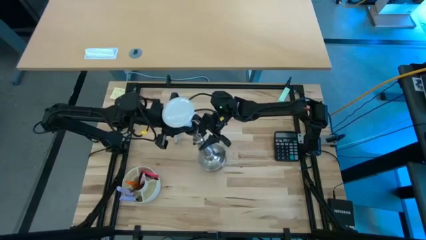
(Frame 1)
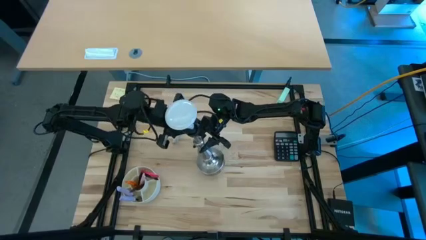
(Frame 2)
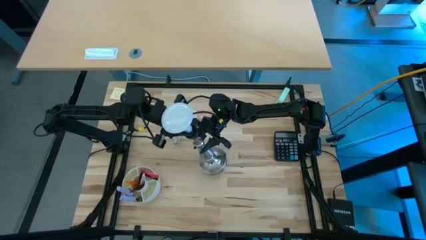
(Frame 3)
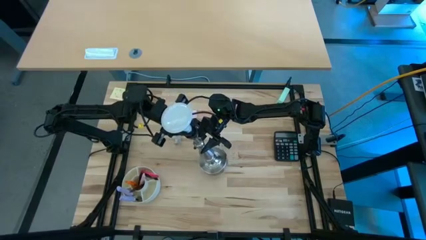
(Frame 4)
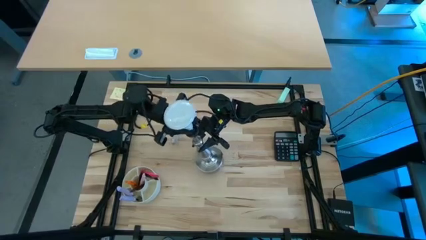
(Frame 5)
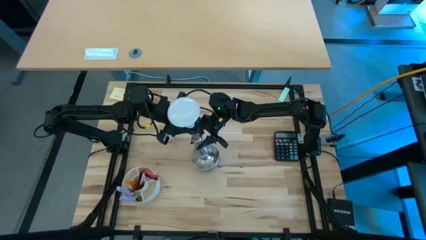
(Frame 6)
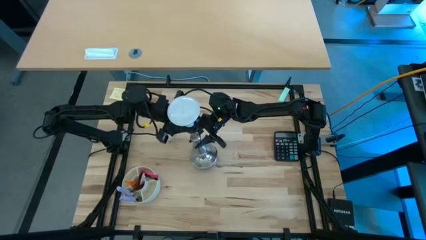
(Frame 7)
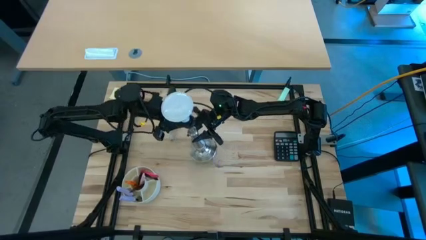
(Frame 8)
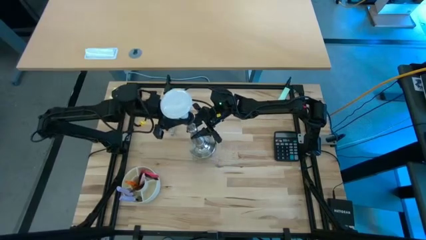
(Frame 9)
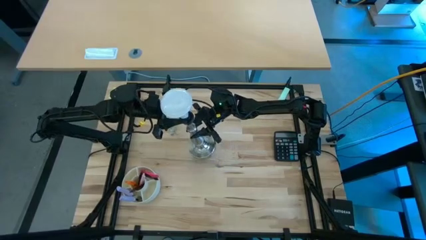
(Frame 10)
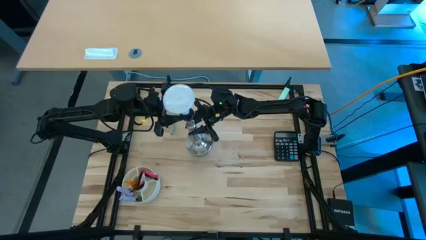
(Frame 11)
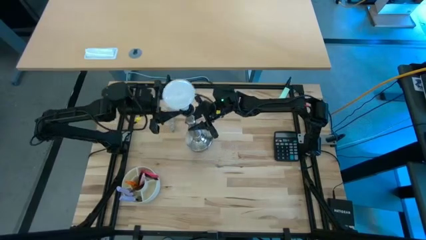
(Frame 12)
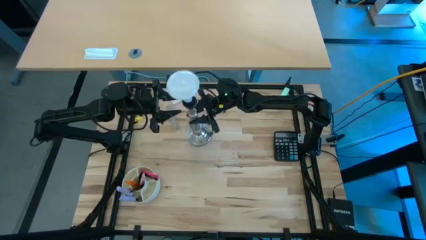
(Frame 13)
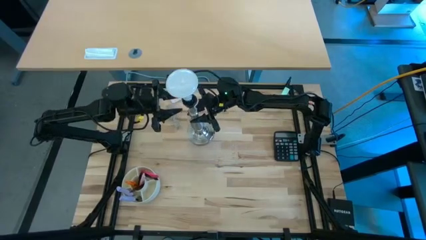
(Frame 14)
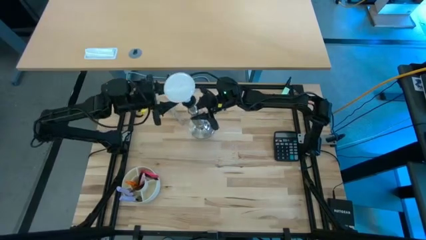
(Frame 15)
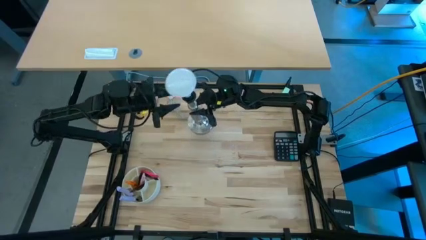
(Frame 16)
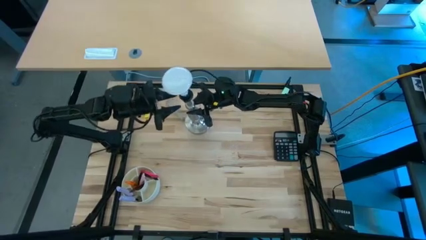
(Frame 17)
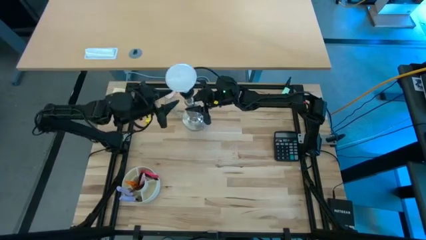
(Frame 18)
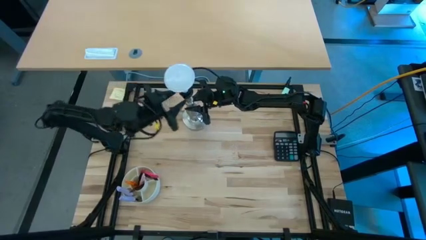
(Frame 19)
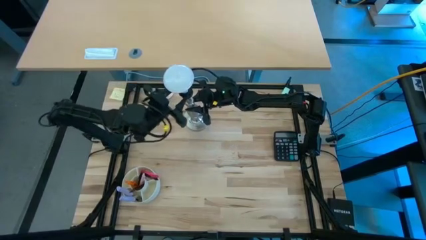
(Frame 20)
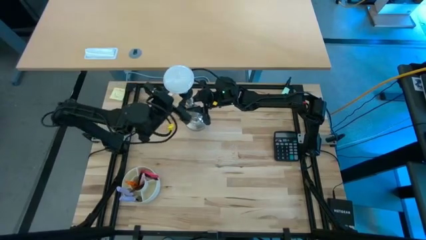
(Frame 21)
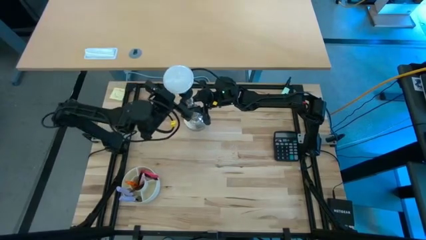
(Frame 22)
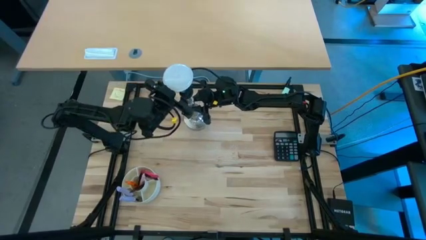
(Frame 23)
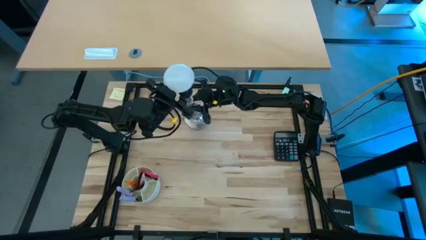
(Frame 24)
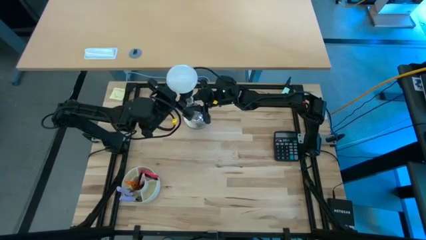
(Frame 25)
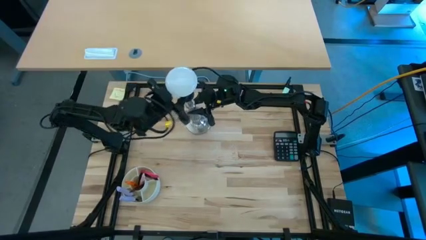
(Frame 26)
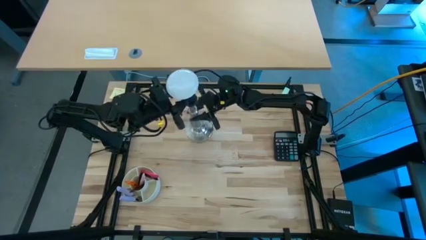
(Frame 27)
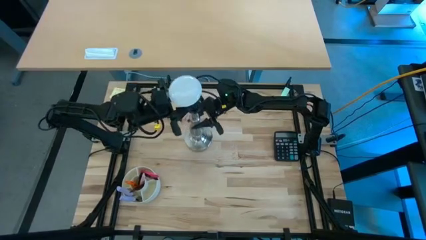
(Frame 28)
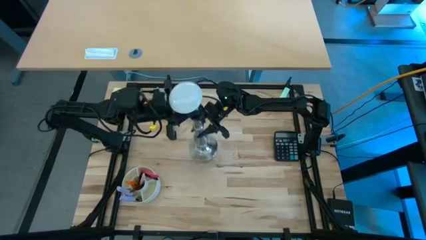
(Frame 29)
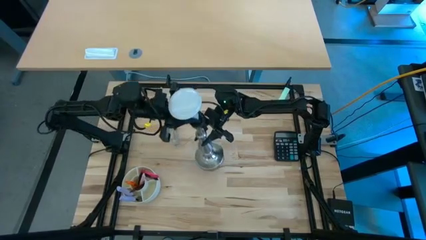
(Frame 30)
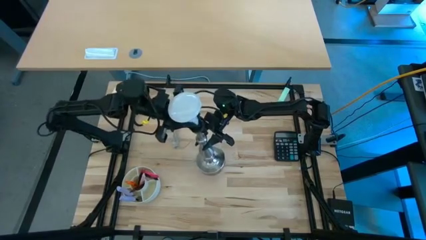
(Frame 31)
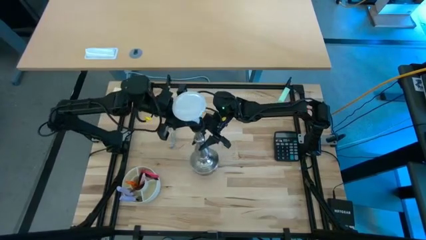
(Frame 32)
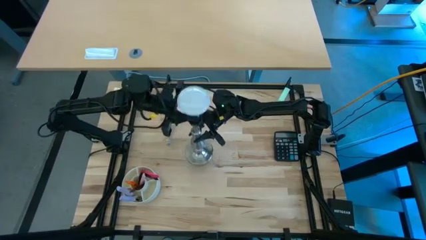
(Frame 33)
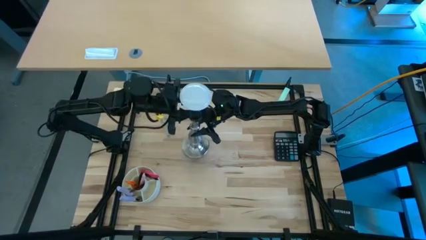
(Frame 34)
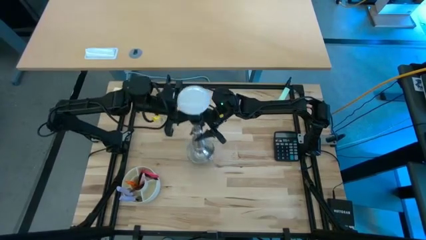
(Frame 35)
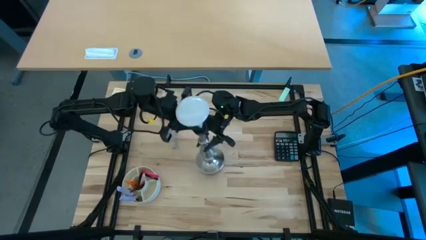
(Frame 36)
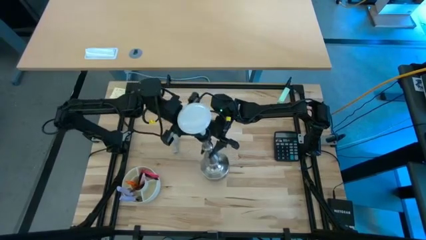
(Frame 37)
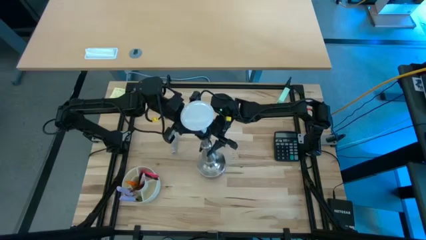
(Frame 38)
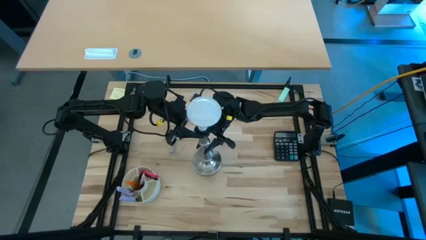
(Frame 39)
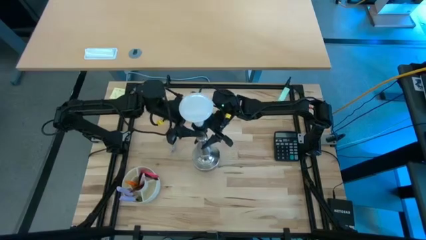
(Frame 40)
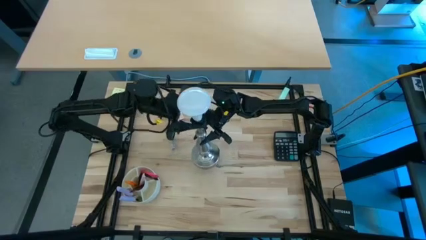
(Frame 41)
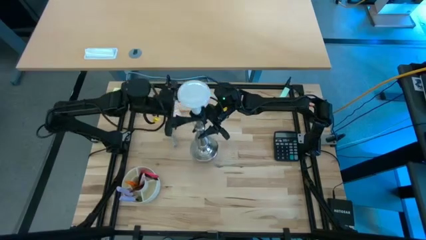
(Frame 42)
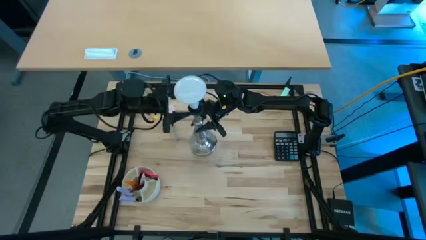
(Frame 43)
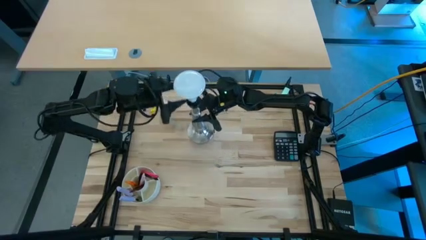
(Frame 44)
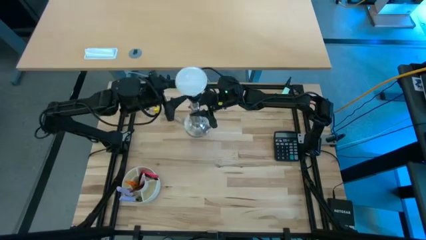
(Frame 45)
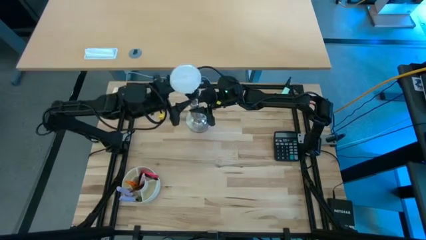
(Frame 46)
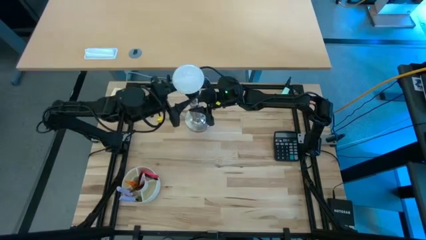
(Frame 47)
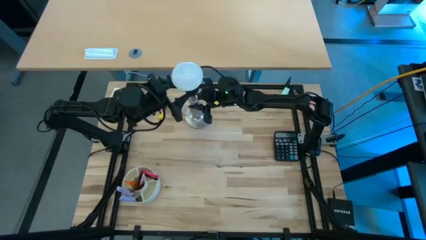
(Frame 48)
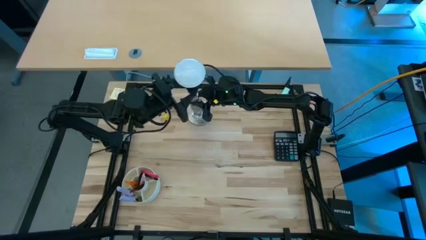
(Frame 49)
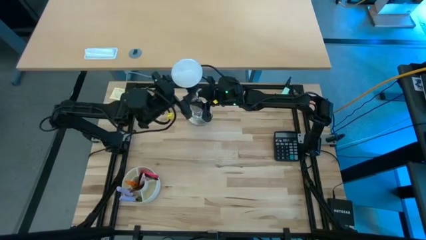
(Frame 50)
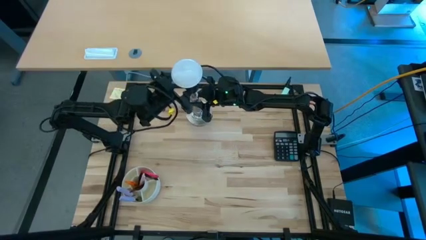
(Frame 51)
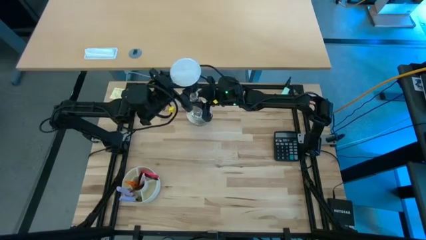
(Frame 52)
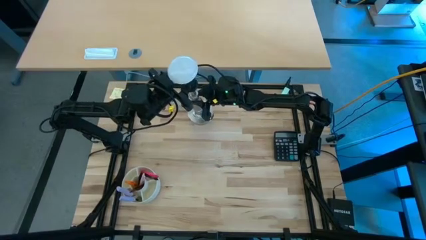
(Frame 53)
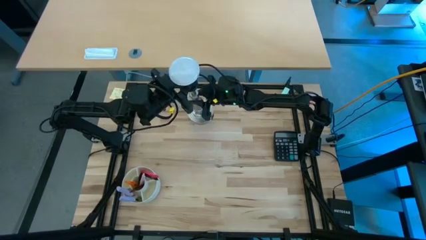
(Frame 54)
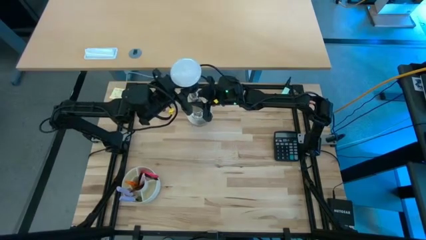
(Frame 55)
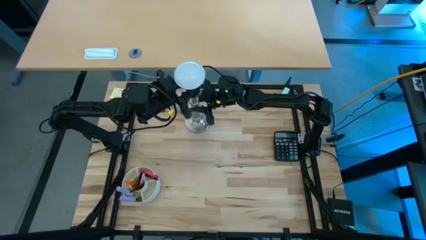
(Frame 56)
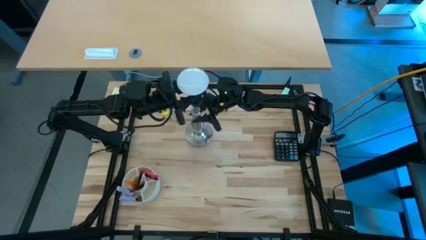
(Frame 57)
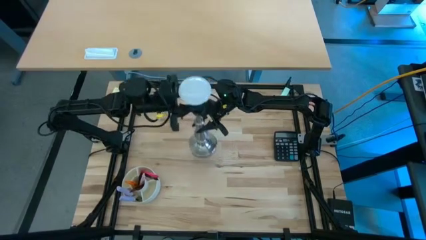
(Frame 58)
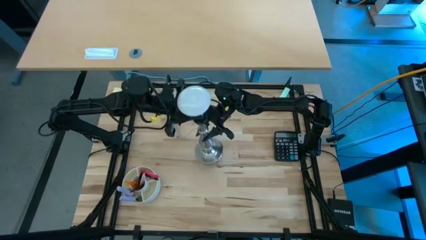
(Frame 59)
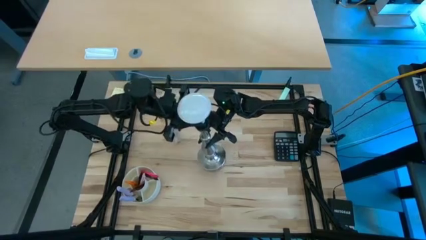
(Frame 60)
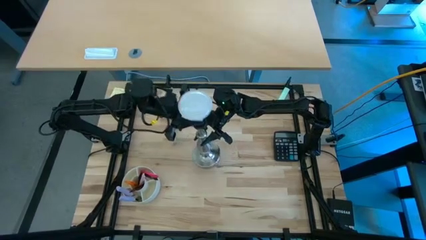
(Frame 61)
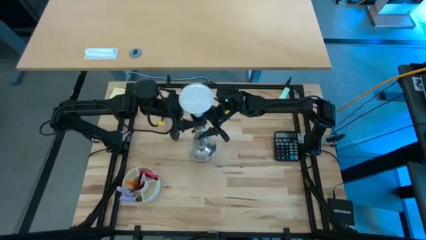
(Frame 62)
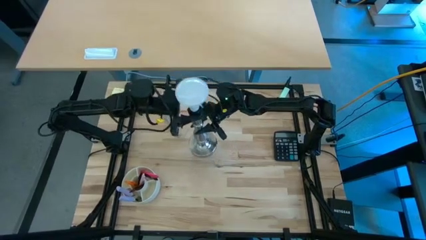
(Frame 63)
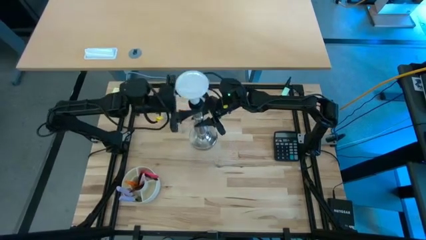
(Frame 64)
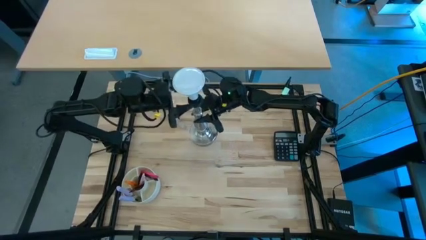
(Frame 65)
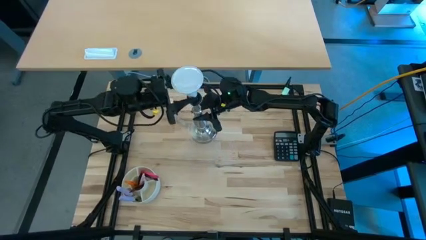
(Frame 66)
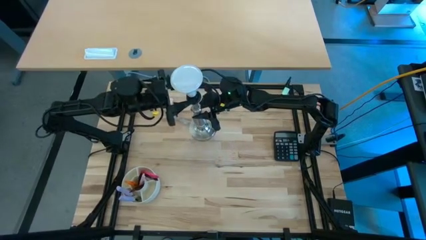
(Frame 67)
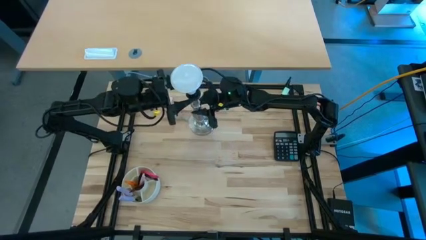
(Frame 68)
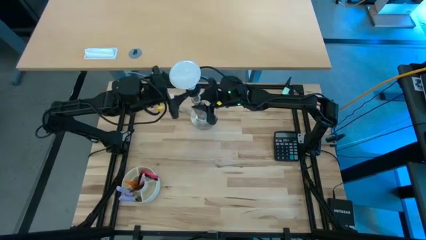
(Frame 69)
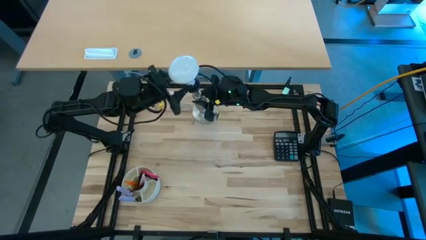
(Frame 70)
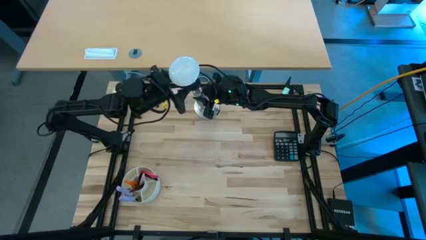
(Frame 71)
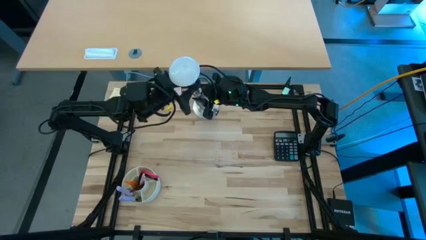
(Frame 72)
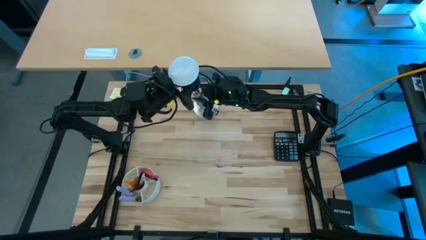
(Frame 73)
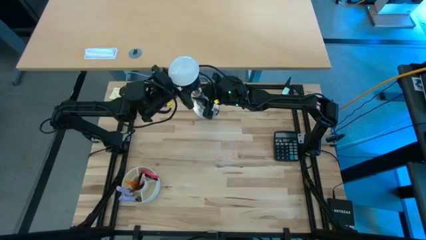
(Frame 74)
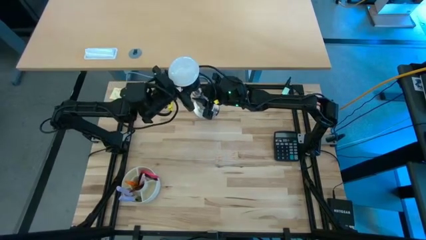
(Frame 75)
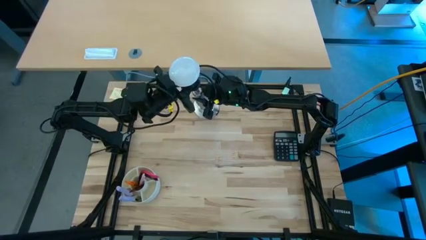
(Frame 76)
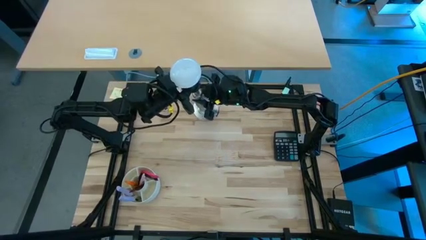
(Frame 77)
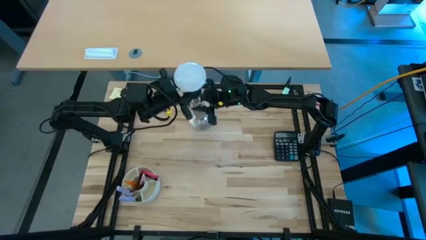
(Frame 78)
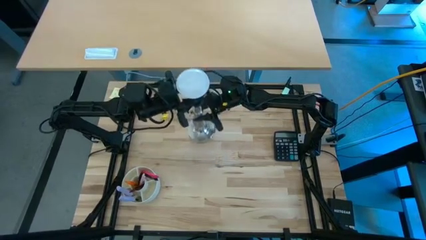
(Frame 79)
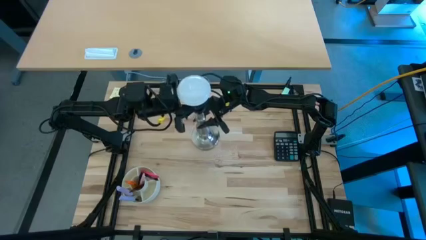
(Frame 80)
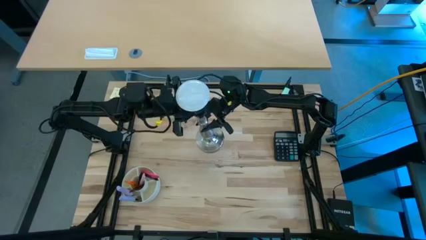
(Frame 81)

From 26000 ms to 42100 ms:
Task: Screw lightbulb
Insert the white lightbulb on the silver lamp
